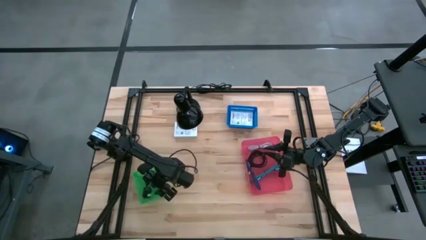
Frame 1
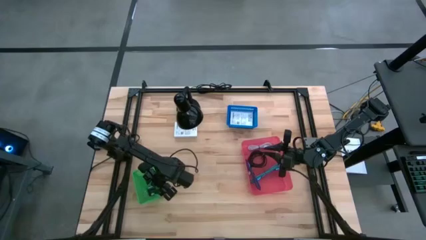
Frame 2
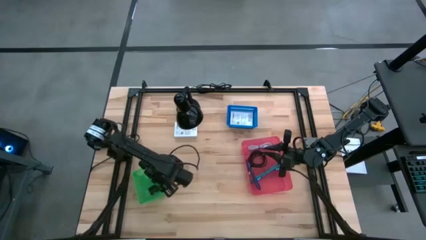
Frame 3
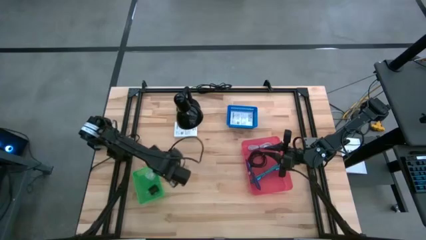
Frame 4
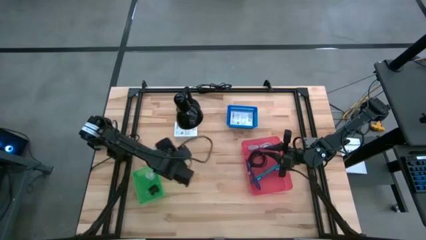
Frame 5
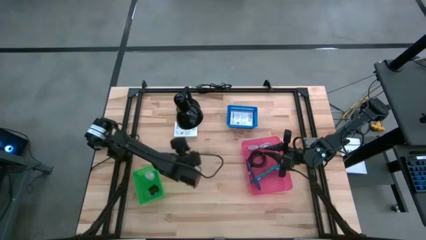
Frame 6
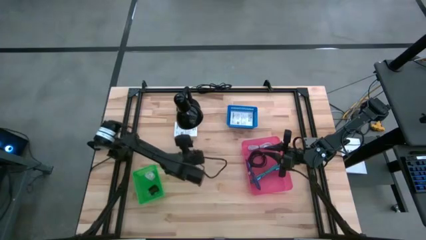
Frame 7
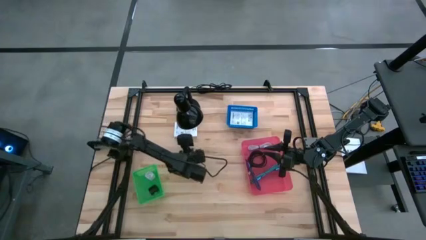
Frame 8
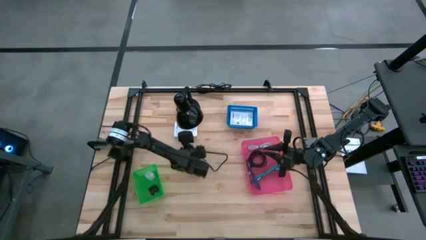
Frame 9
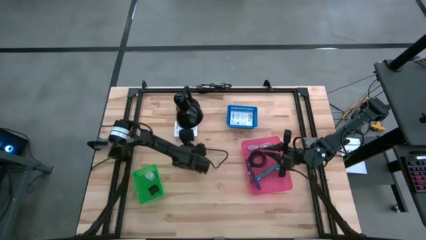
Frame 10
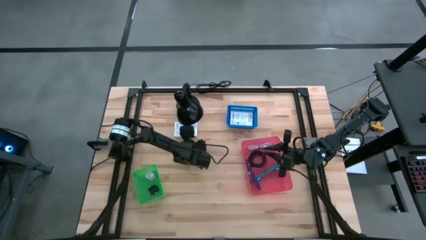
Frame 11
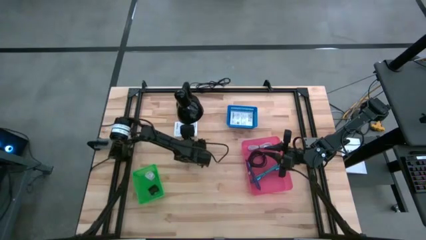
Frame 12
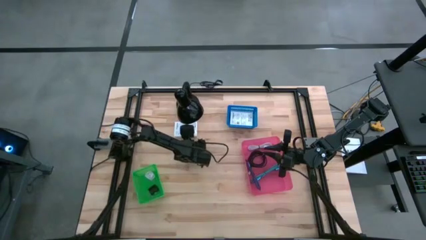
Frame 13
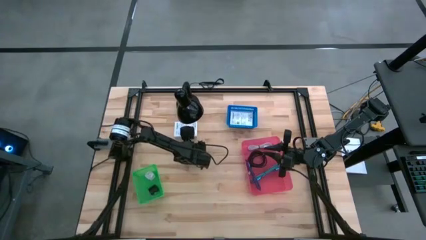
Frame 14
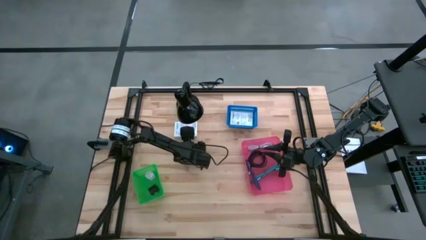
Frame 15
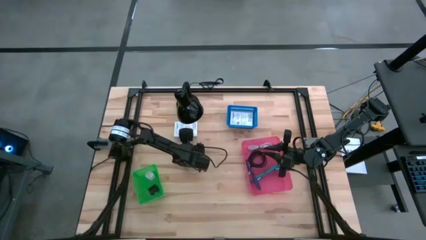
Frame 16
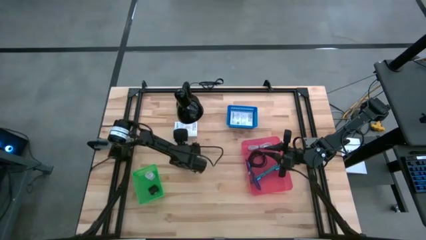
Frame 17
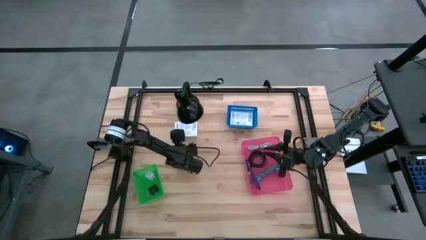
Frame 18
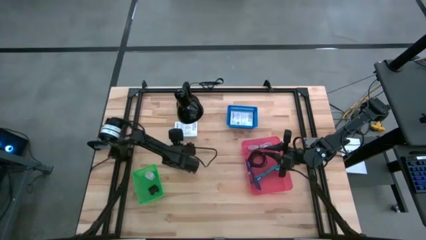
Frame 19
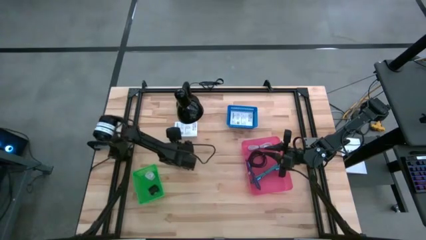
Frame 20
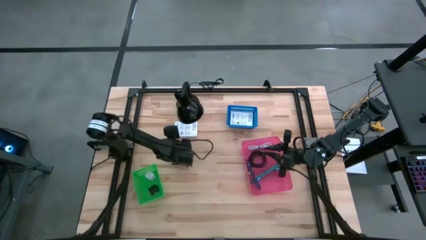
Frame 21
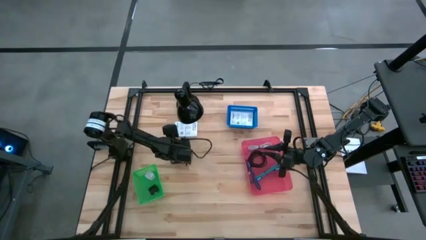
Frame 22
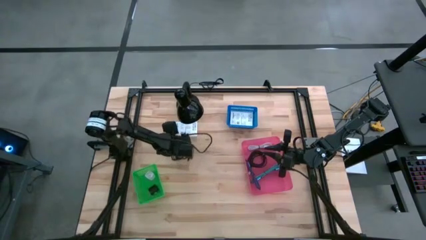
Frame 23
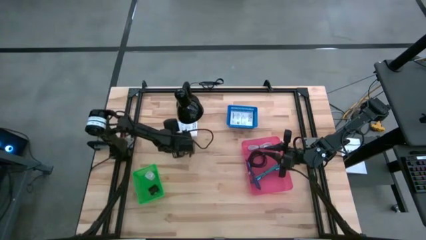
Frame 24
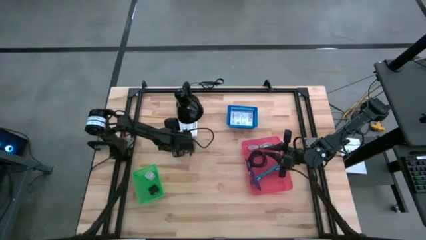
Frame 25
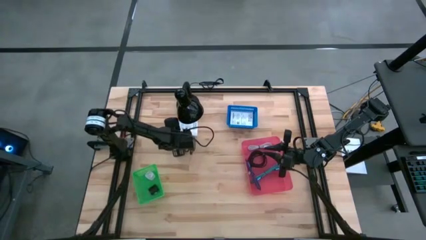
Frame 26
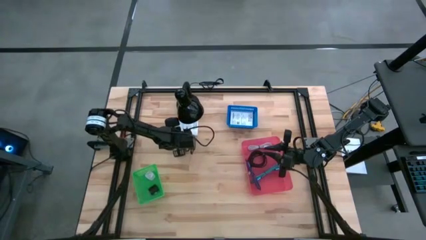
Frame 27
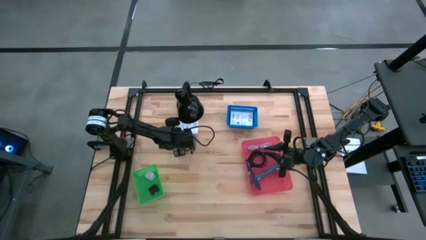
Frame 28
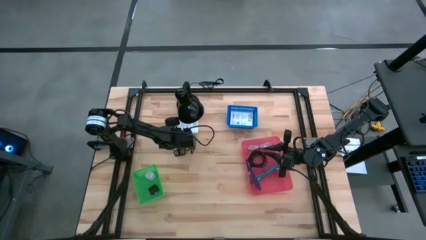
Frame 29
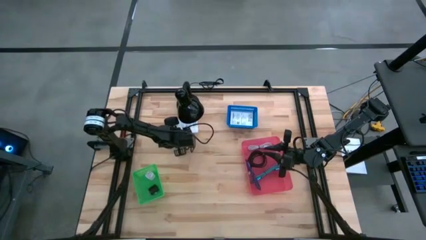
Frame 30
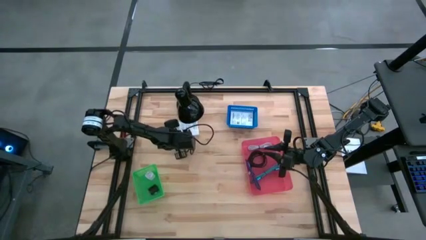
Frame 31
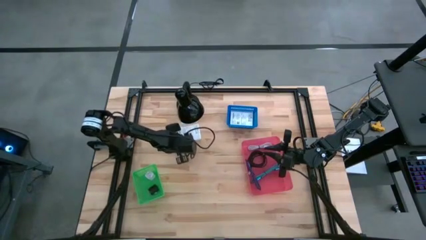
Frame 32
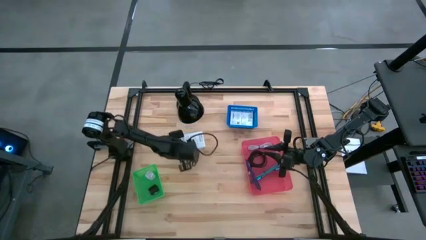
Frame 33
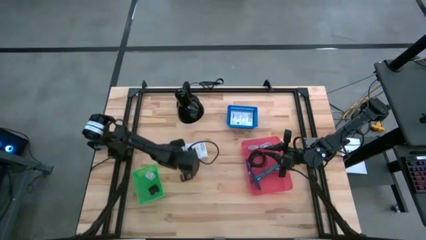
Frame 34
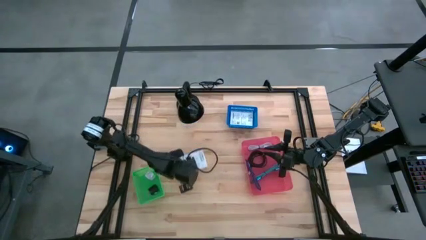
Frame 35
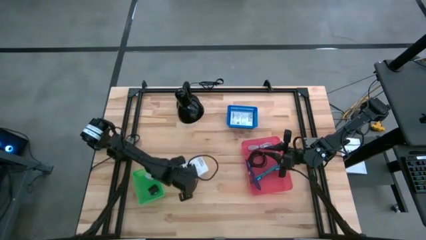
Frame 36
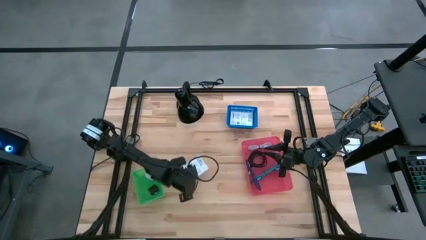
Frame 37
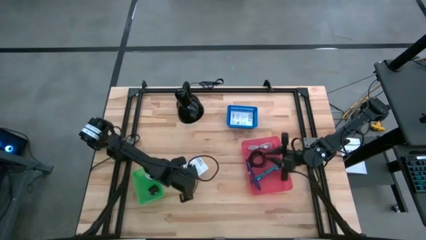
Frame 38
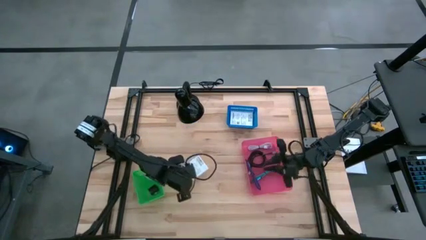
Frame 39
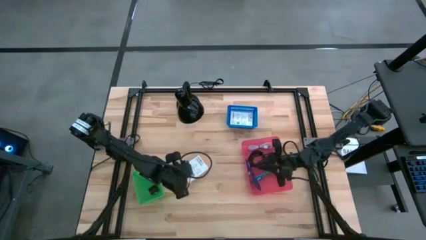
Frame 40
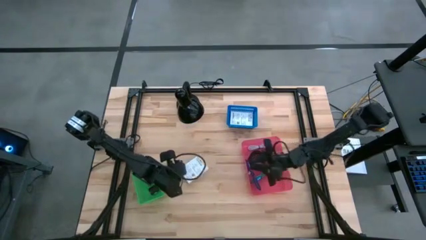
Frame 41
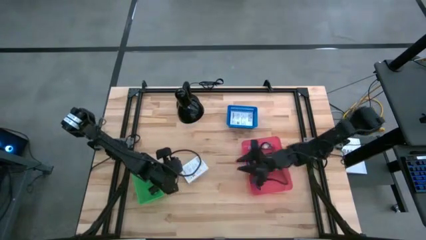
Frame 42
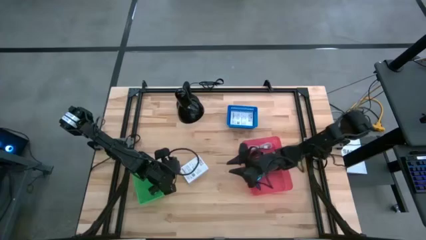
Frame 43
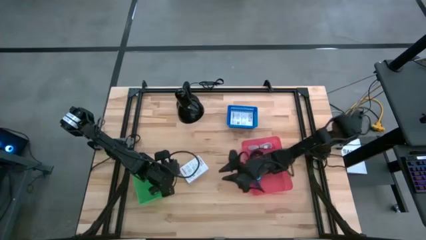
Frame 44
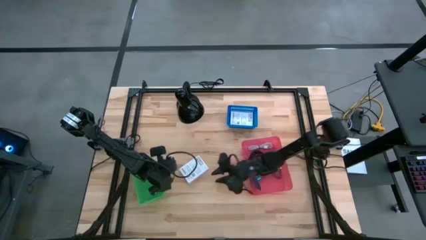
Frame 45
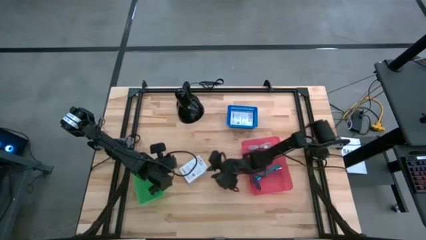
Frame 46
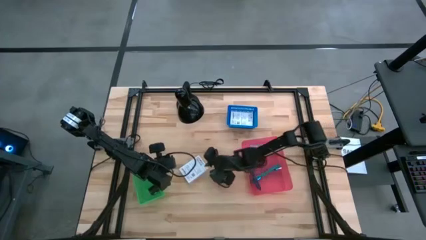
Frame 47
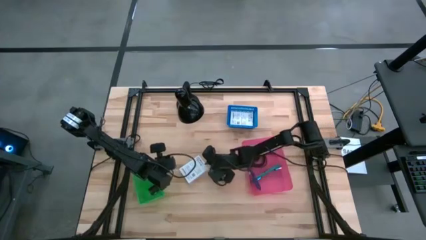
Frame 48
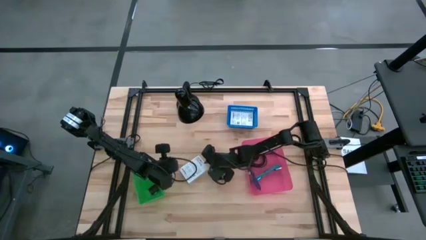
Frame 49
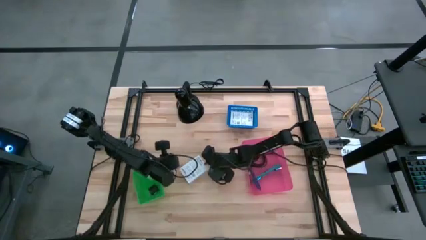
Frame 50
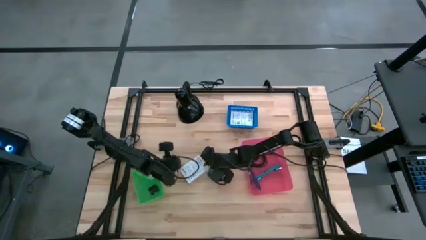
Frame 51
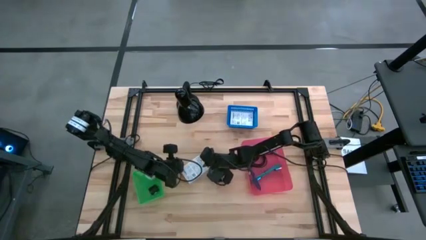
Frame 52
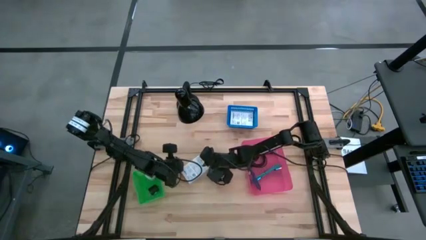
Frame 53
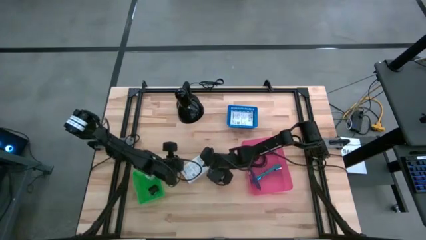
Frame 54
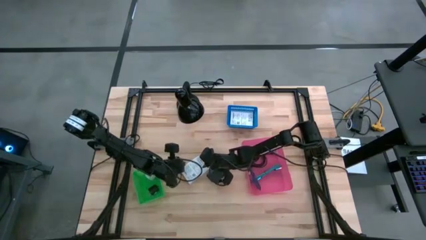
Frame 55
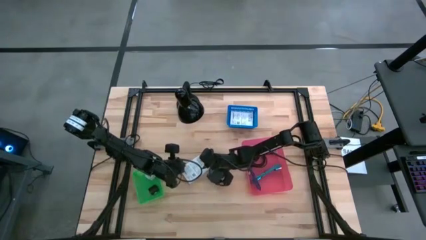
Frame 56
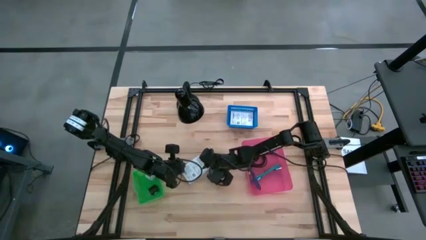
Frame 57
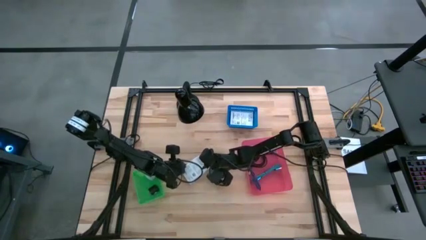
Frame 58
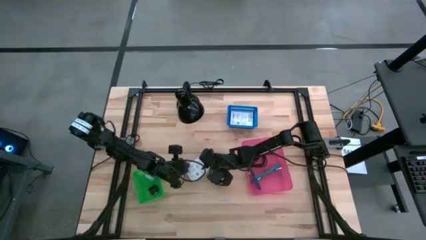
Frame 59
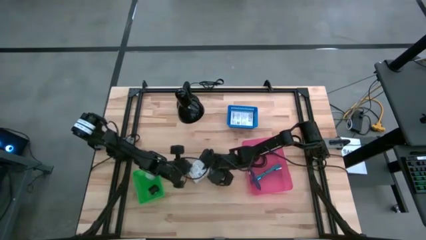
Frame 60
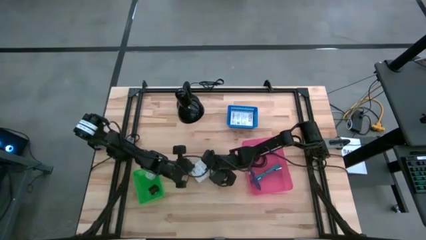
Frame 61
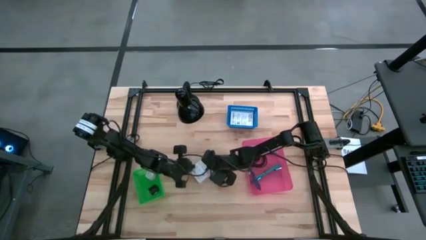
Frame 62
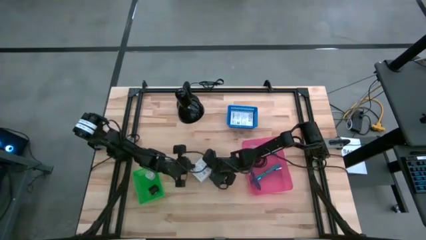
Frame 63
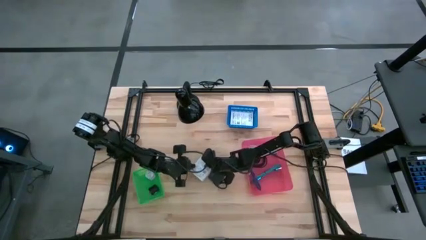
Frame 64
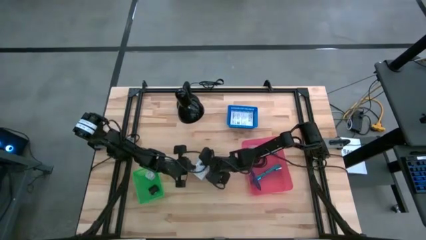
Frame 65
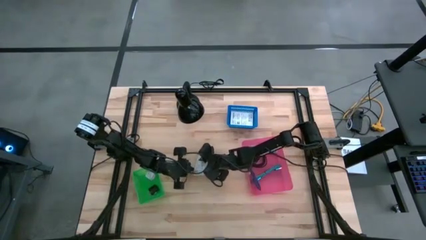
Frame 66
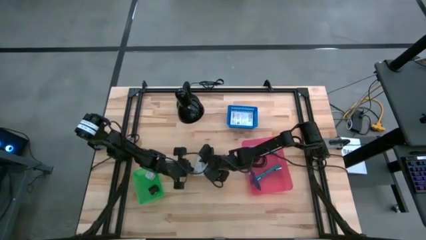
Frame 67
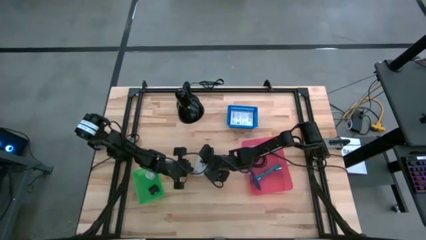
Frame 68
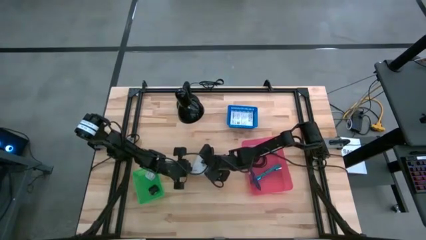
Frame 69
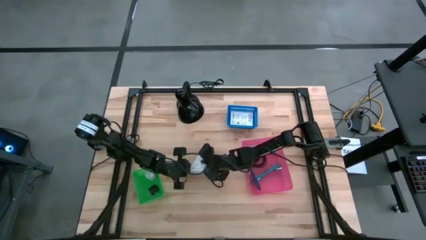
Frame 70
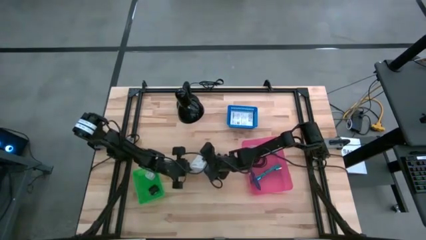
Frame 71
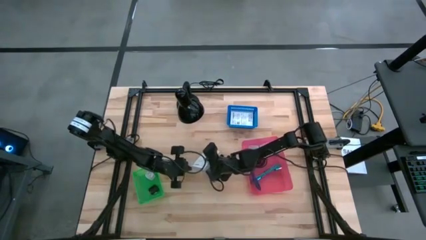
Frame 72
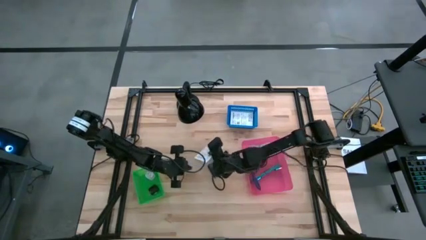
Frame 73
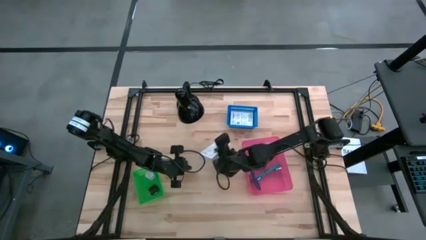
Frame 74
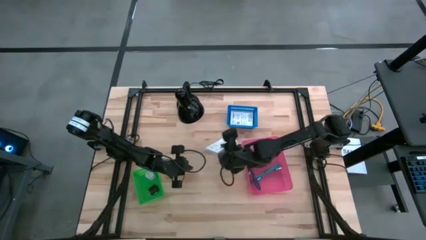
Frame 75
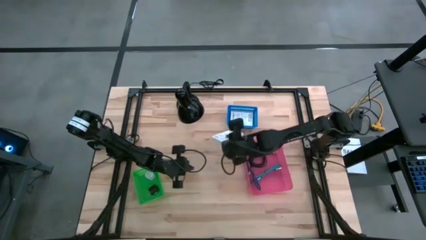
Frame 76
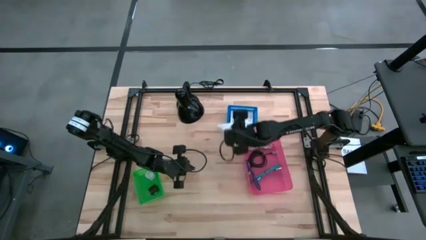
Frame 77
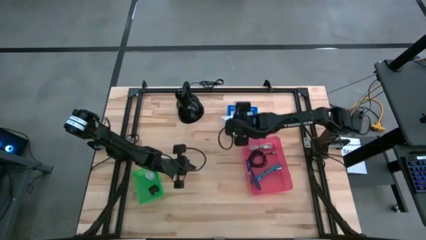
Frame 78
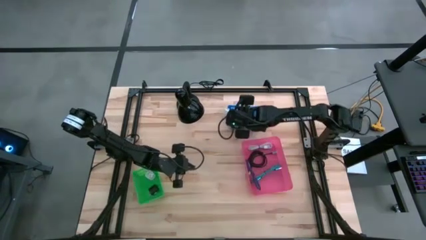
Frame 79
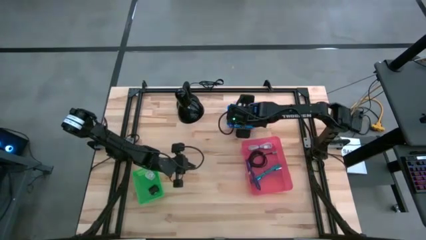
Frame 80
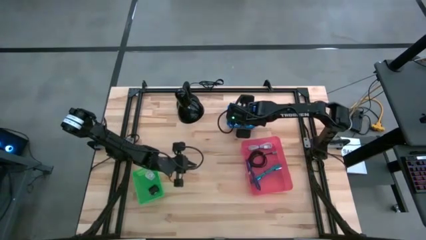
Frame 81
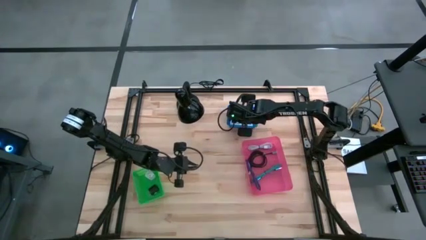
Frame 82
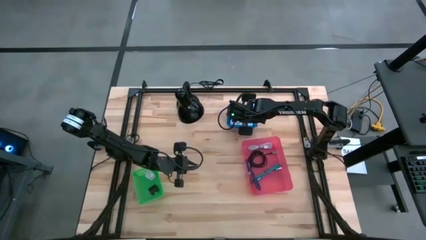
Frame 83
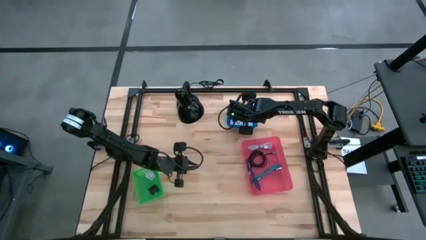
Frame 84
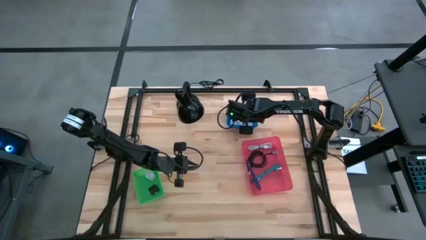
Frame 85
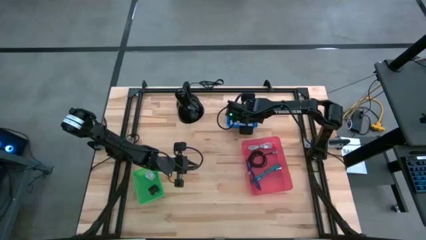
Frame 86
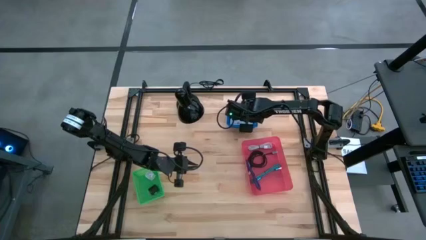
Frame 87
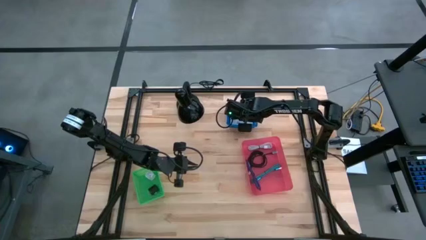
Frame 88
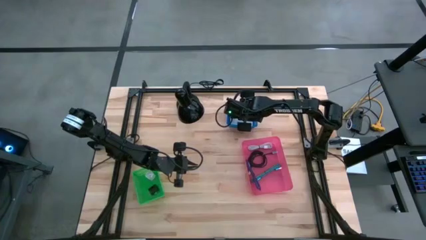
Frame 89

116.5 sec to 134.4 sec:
Task: Pick and place items into bin
Put the white card reader box into the blue bin
